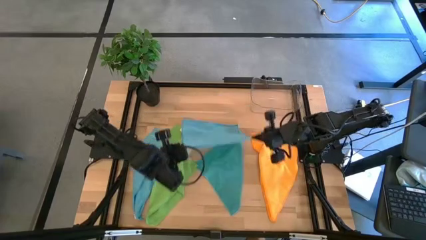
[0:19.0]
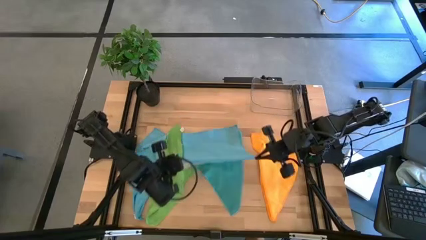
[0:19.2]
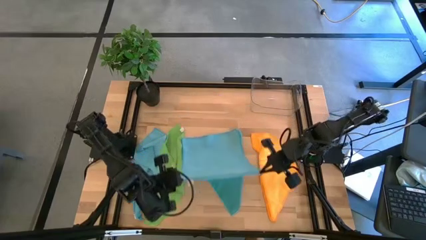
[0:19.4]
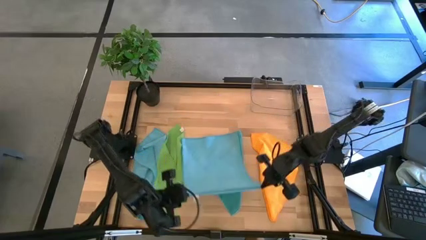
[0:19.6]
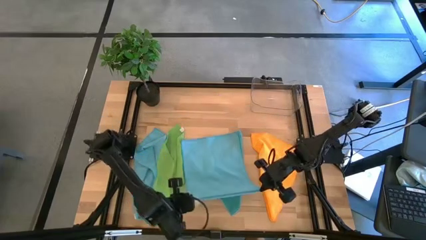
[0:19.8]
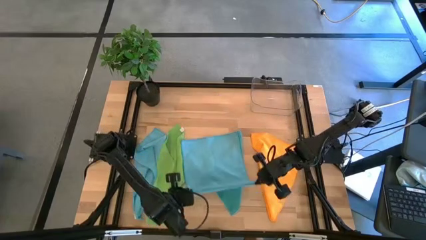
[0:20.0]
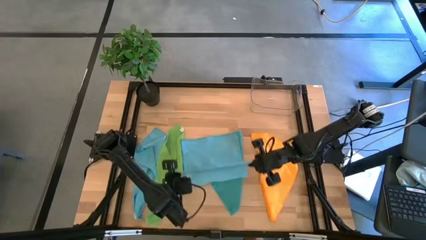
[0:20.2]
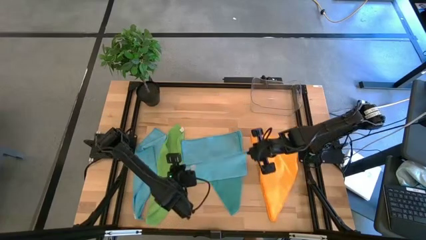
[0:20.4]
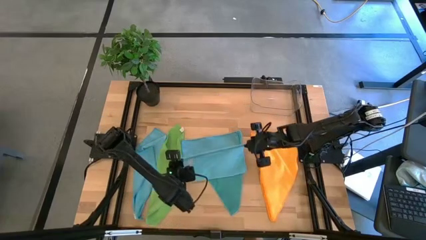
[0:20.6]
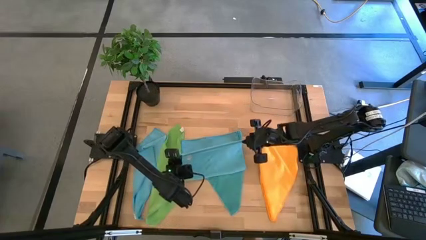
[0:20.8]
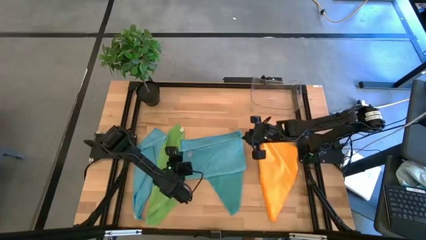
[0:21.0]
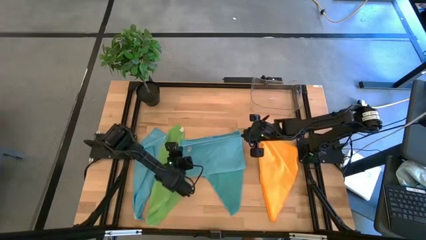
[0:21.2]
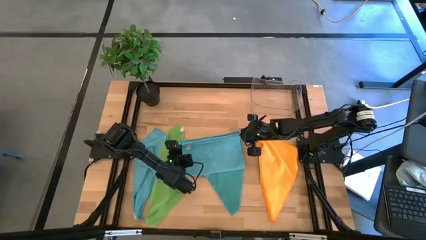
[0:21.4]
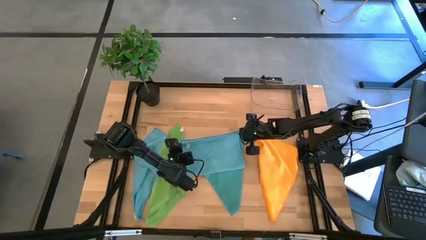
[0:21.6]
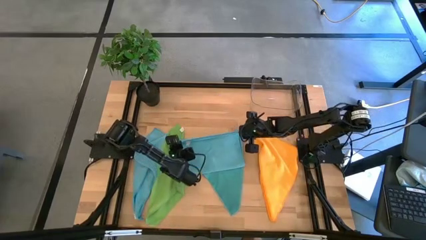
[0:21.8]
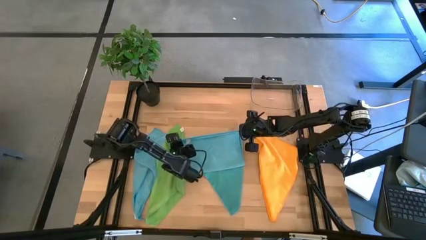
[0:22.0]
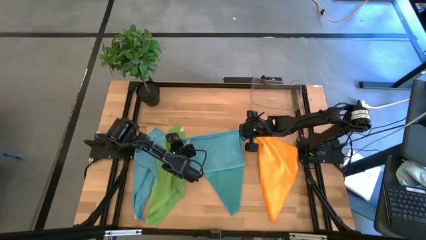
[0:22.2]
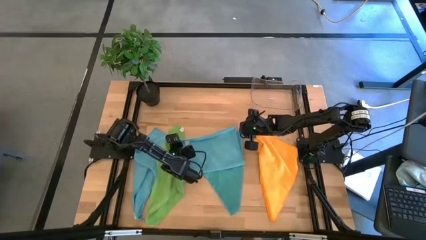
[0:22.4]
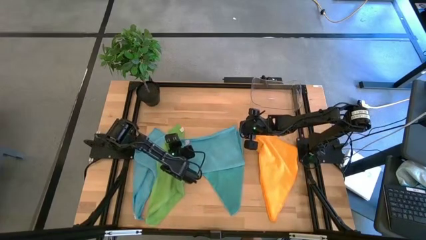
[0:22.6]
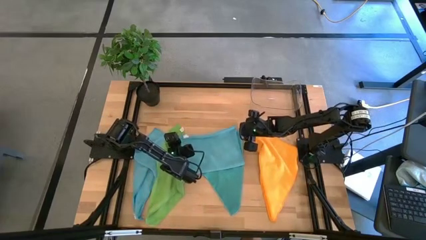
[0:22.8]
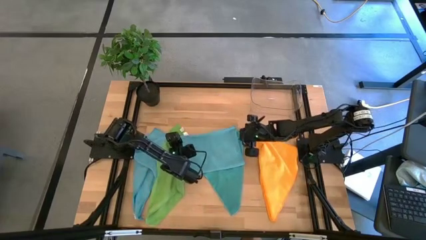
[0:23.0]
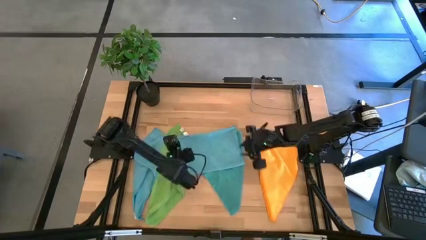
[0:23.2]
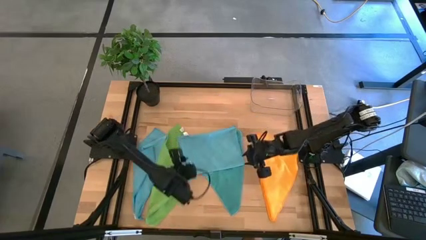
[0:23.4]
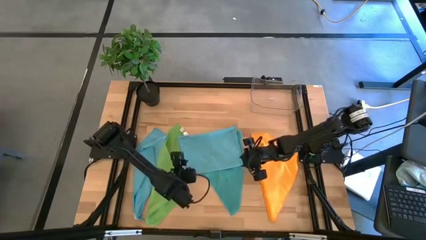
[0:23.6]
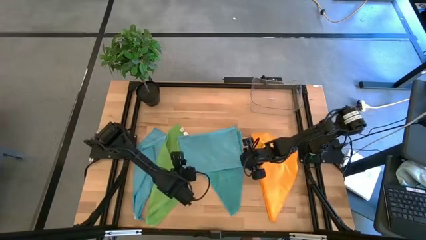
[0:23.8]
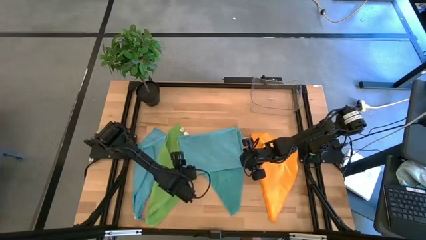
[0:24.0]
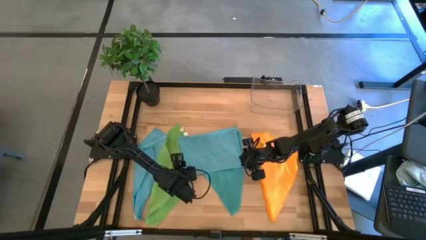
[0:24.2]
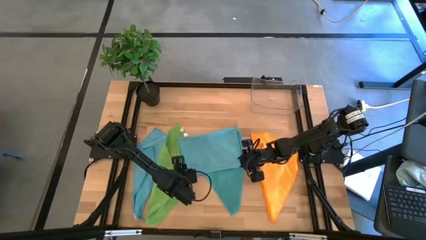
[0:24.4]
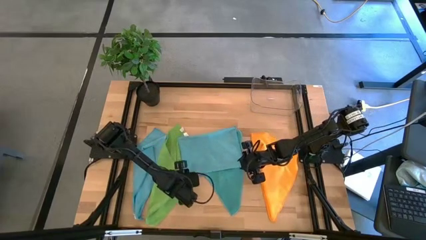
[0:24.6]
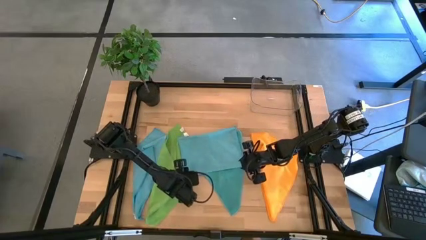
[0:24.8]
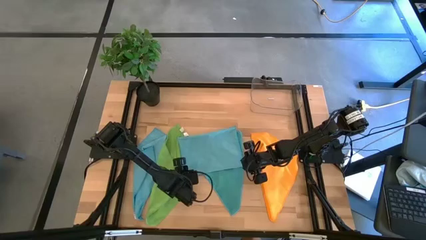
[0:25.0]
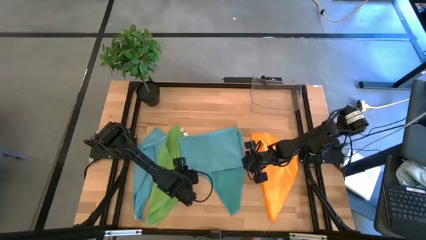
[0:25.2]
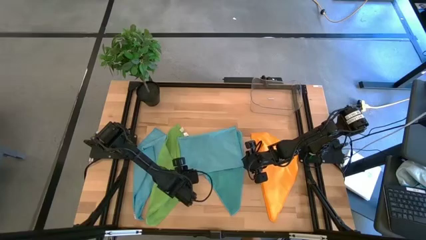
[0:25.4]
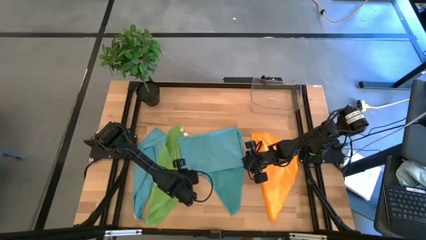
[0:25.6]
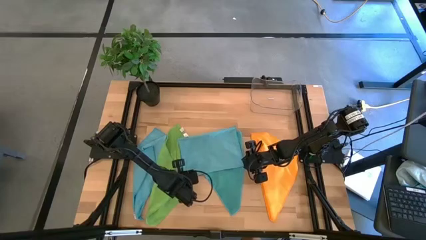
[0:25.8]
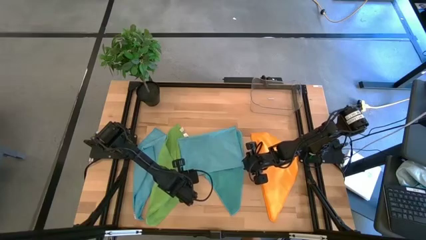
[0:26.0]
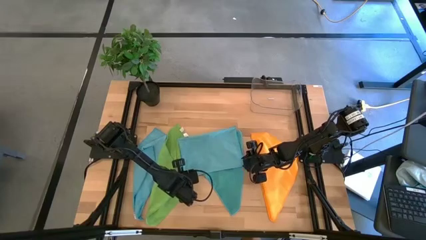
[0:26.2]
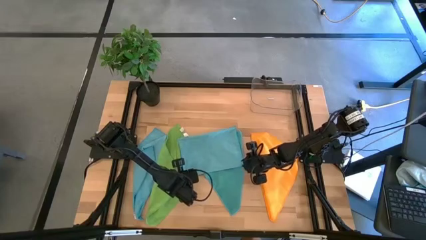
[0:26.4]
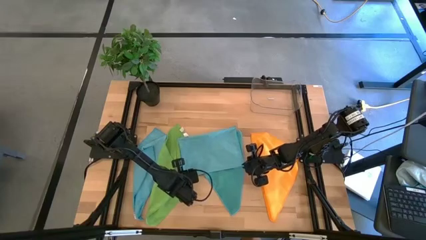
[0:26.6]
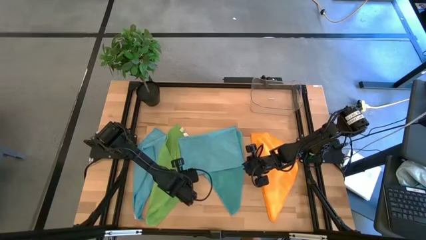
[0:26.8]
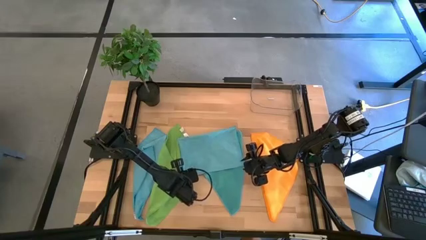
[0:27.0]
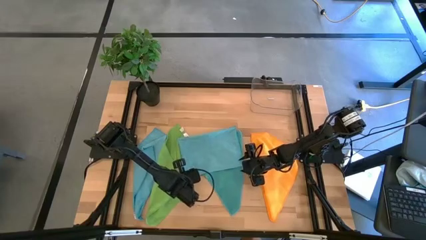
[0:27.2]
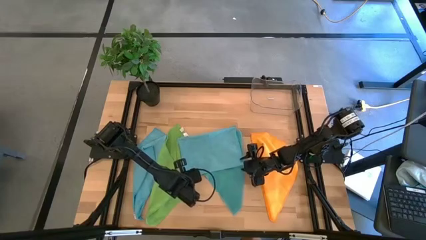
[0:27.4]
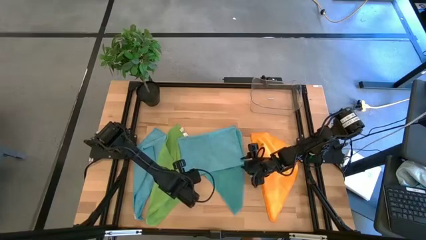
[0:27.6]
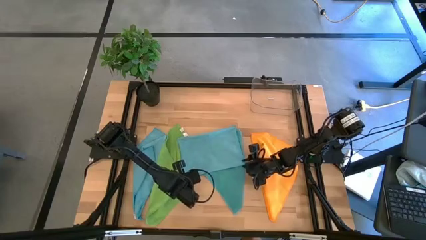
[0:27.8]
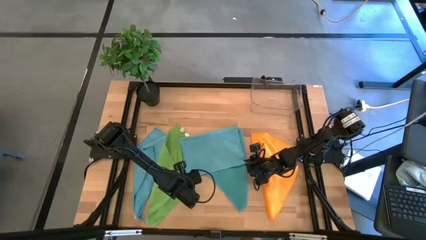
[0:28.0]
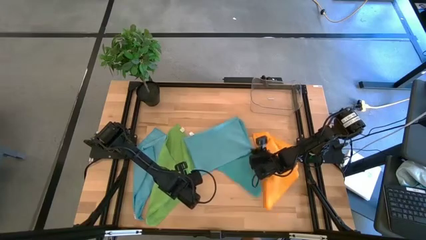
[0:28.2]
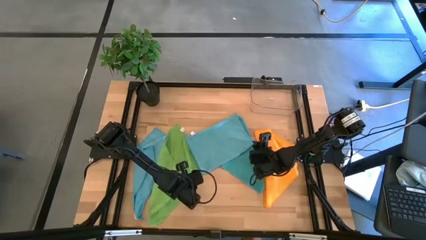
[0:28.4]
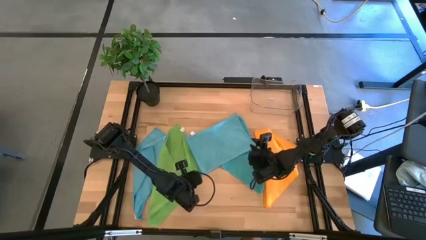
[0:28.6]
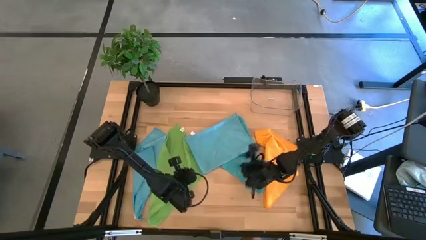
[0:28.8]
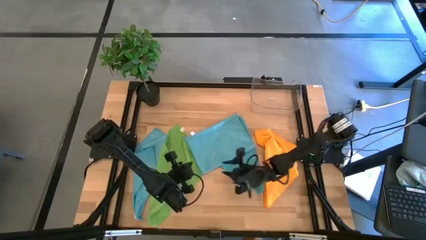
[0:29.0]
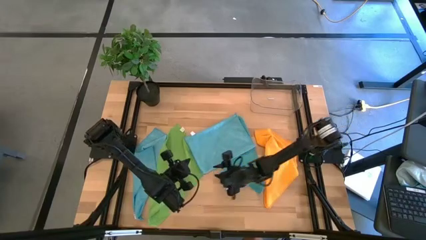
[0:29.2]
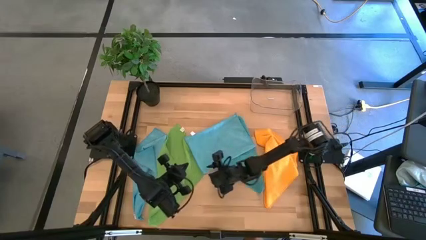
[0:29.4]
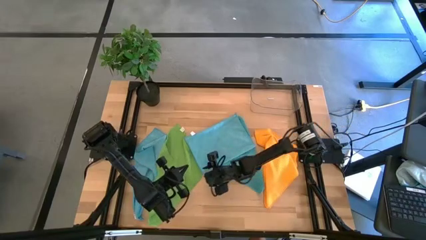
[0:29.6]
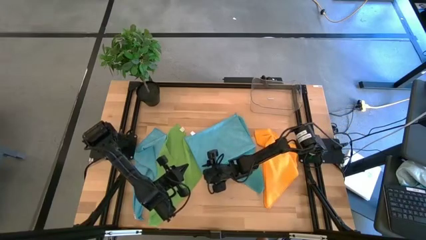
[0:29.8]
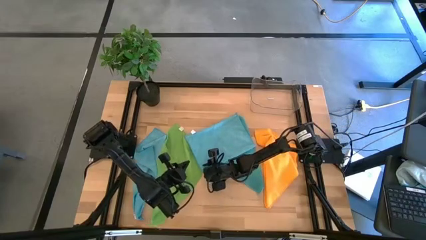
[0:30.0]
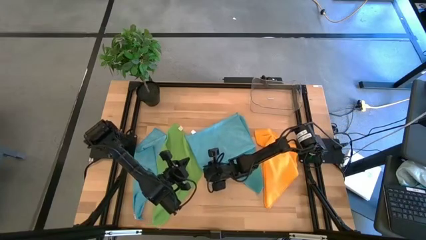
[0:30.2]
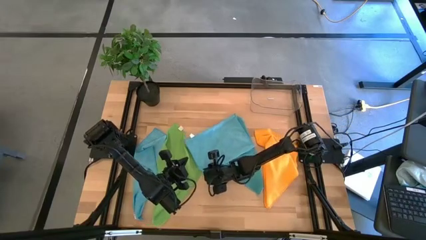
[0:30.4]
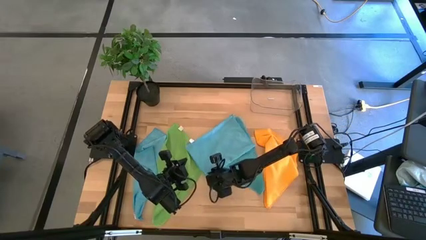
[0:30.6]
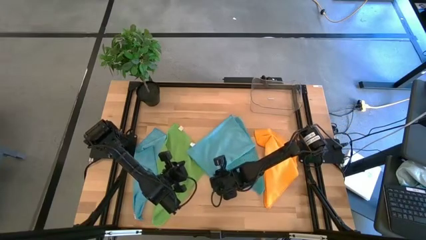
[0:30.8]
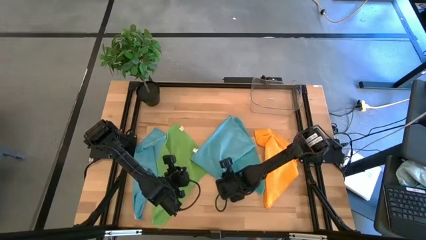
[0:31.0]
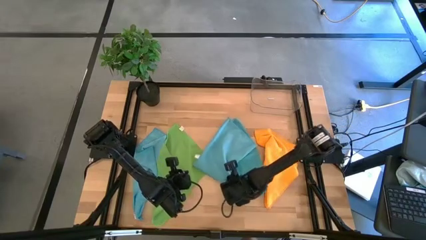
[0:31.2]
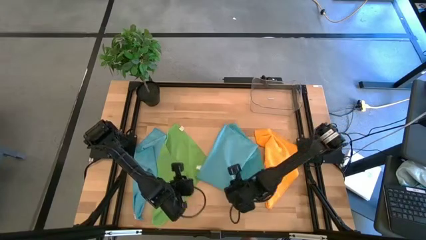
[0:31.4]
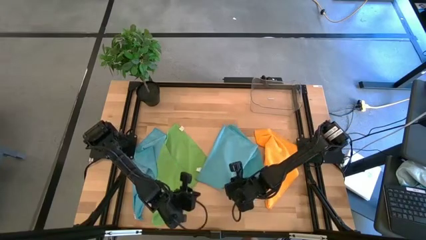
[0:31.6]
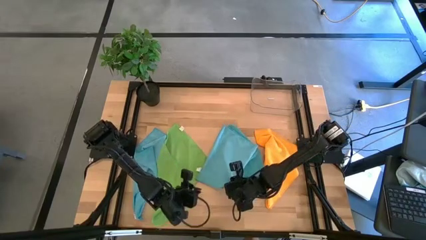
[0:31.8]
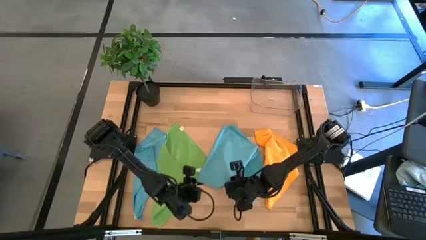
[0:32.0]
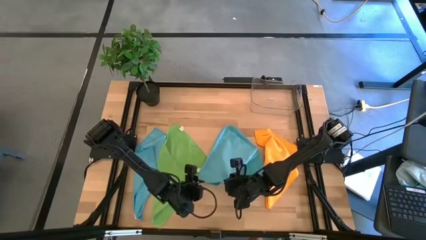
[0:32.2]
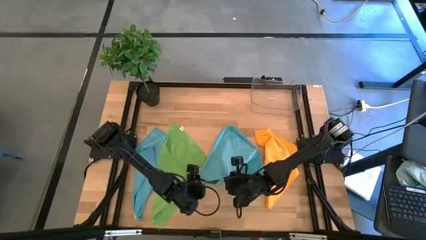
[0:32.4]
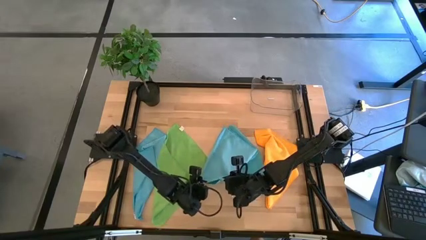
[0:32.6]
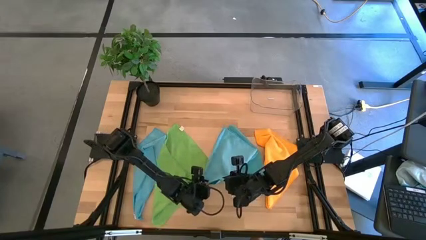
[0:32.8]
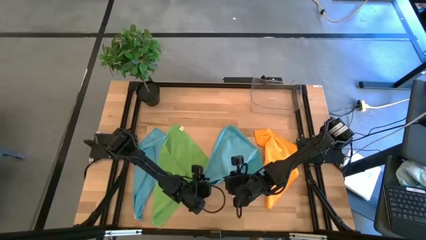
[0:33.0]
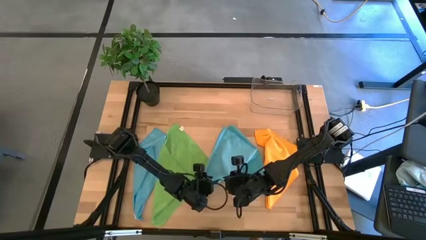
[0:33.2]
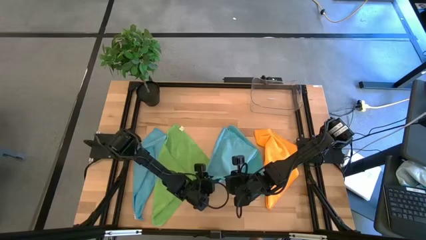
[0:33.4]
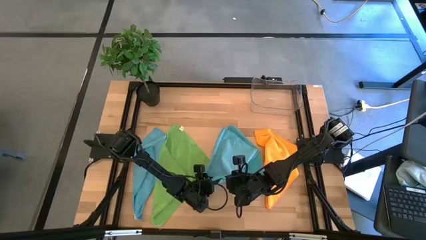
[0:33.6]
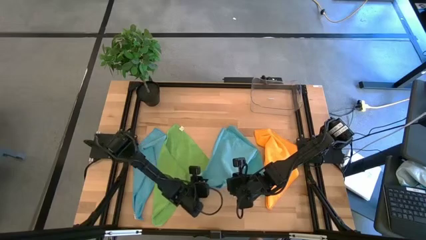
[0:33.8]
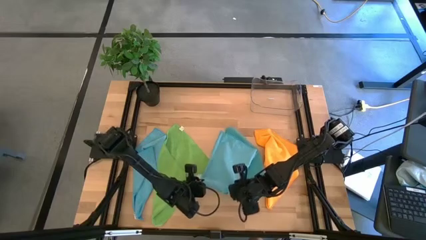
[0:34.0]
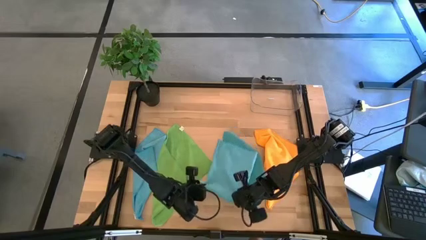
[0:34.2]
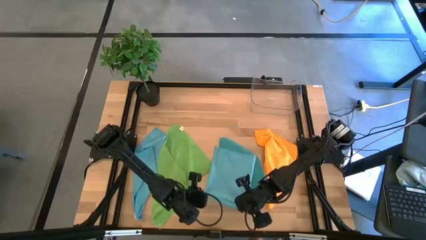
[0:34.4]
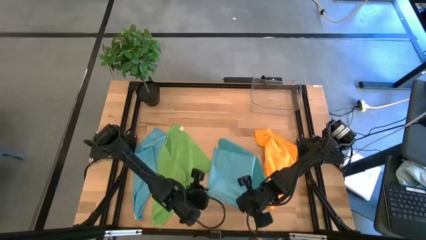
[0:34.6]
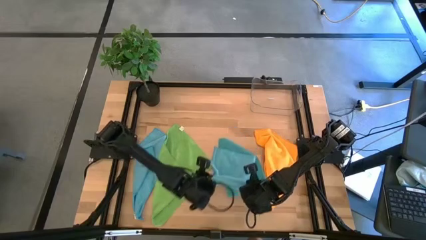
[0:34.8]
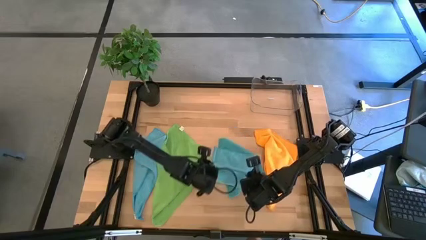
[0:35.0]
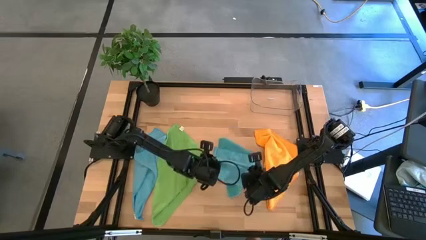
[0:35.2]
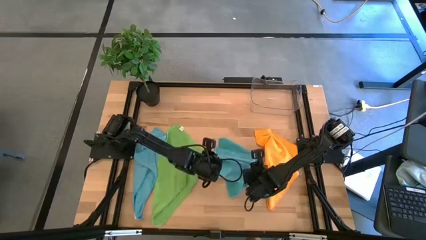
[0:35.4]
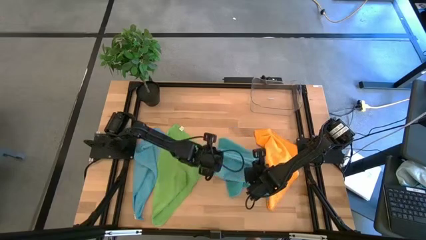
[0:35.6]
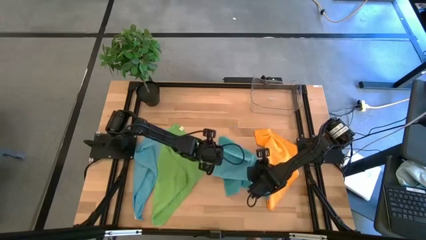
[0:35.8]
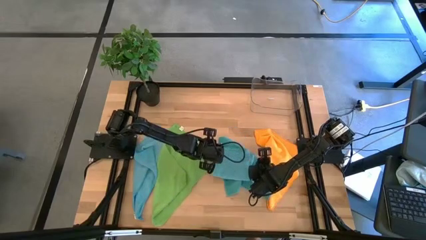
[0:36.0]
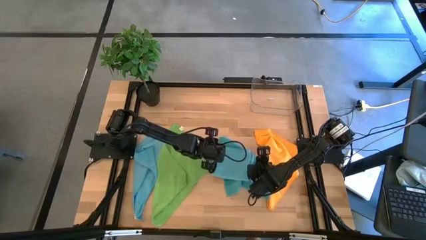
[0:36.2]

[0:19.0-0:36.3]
Task: Fold microfiber towels
Fold the right light blue microfiber towel
